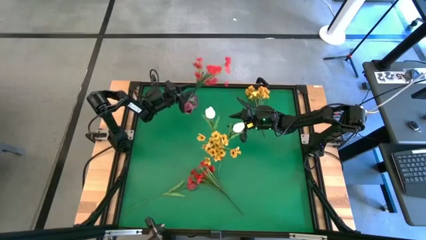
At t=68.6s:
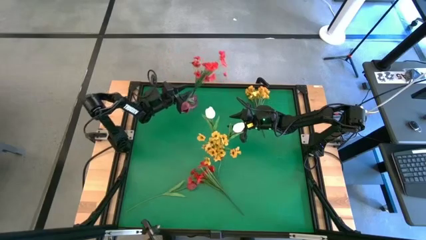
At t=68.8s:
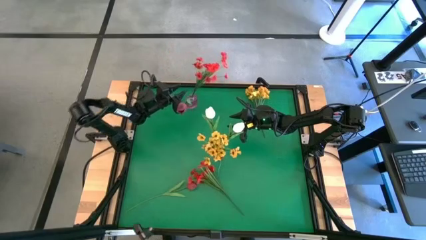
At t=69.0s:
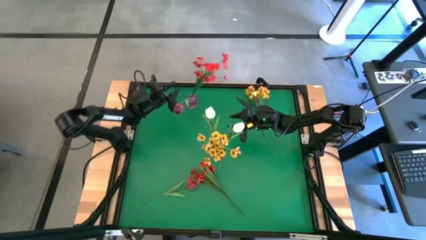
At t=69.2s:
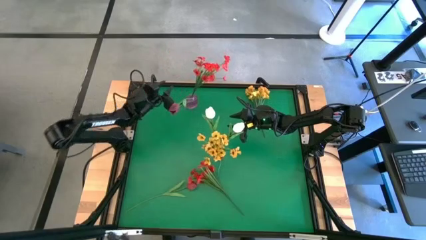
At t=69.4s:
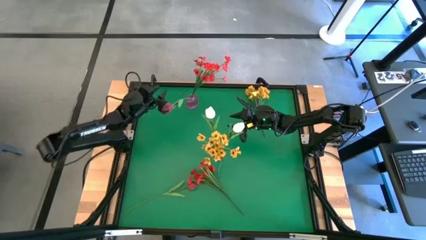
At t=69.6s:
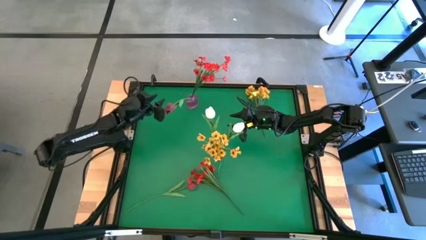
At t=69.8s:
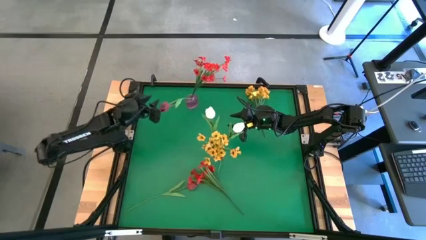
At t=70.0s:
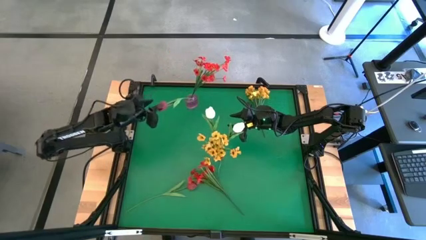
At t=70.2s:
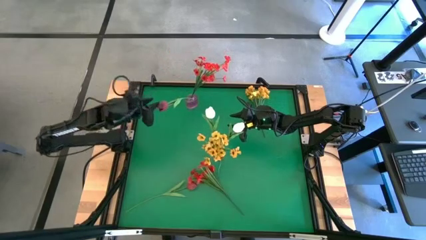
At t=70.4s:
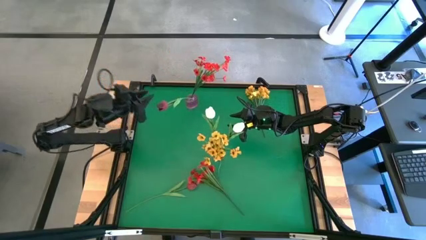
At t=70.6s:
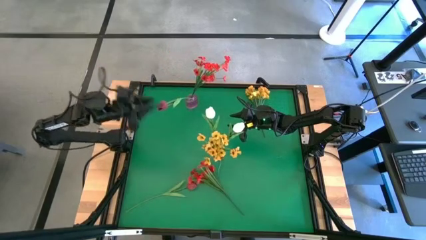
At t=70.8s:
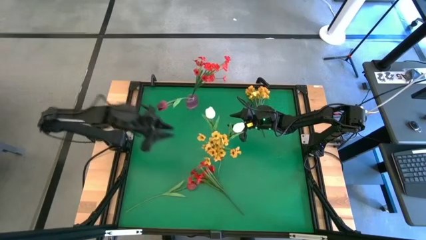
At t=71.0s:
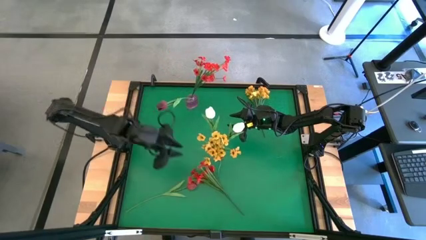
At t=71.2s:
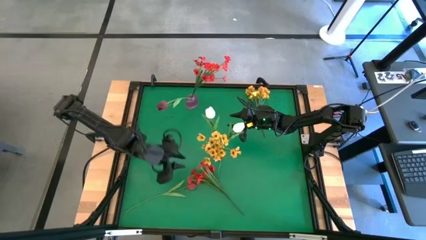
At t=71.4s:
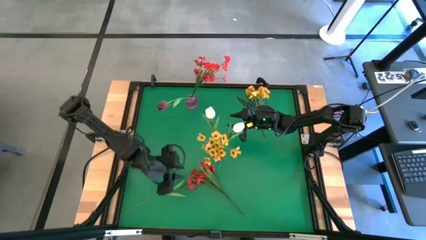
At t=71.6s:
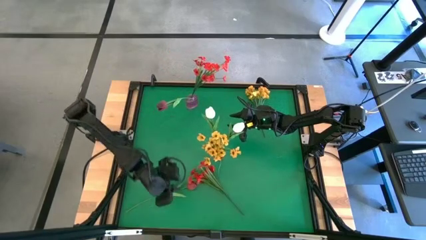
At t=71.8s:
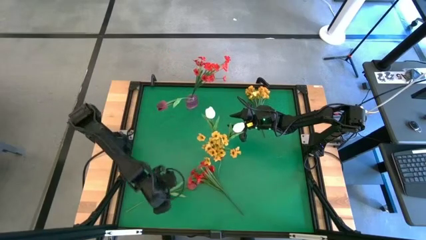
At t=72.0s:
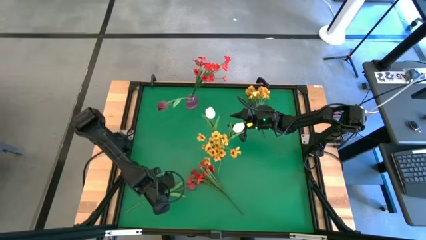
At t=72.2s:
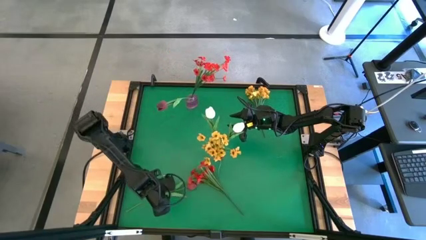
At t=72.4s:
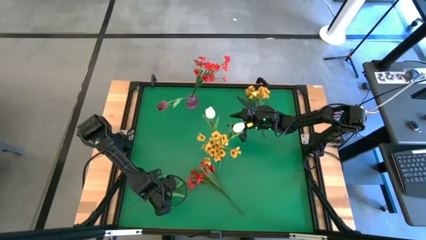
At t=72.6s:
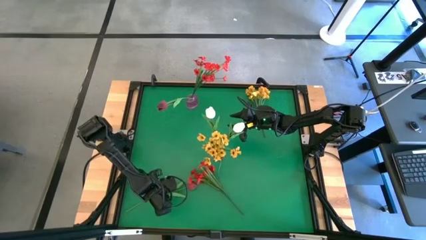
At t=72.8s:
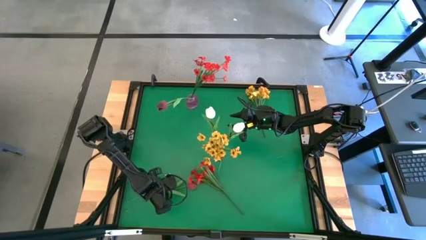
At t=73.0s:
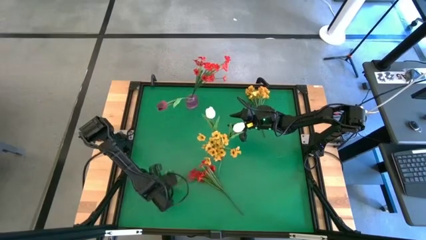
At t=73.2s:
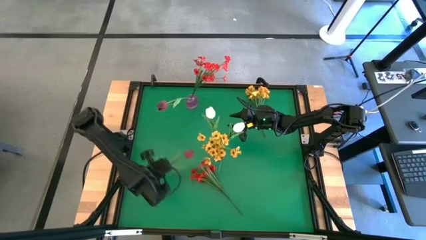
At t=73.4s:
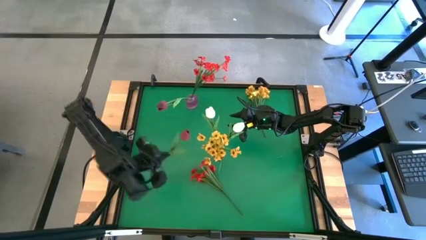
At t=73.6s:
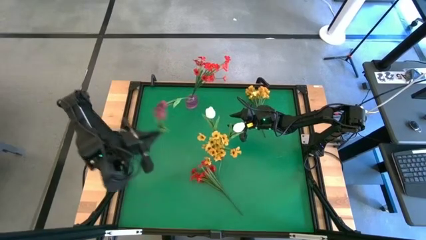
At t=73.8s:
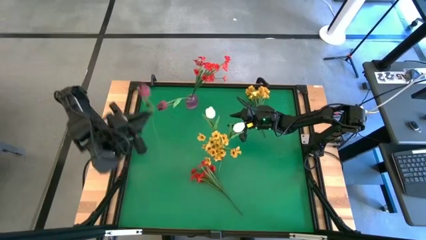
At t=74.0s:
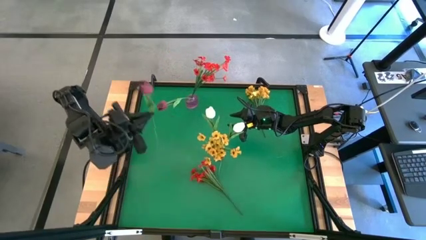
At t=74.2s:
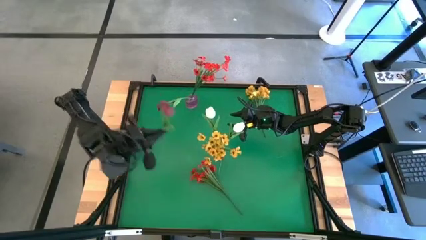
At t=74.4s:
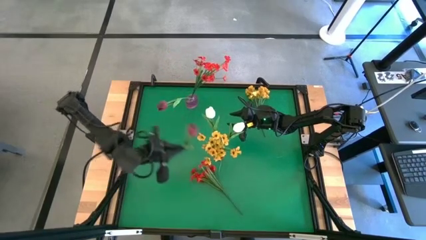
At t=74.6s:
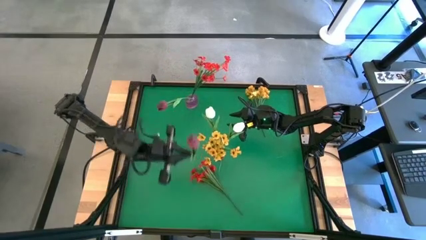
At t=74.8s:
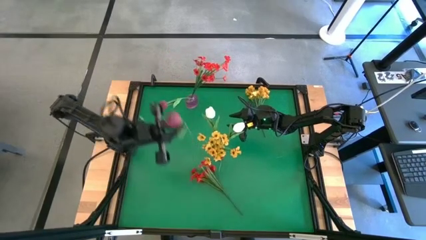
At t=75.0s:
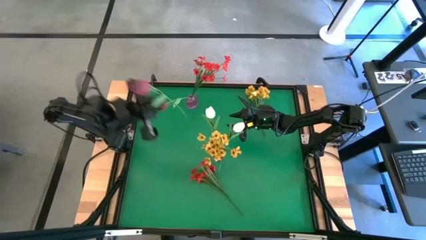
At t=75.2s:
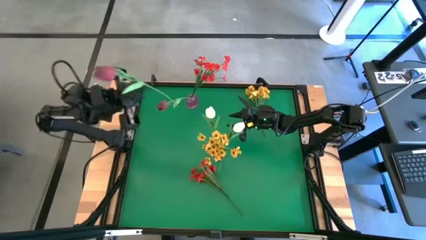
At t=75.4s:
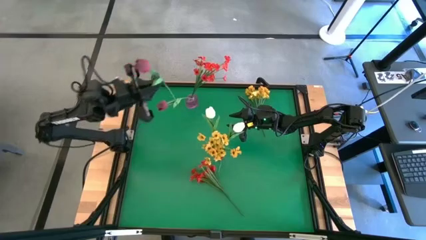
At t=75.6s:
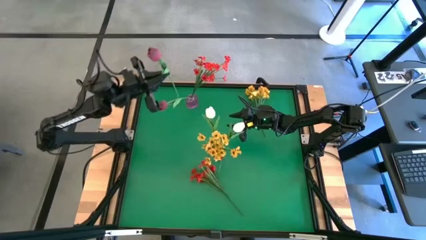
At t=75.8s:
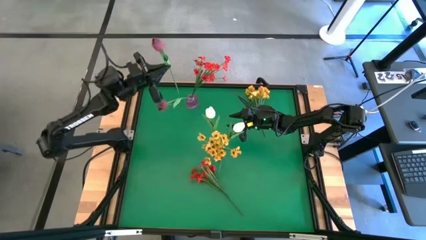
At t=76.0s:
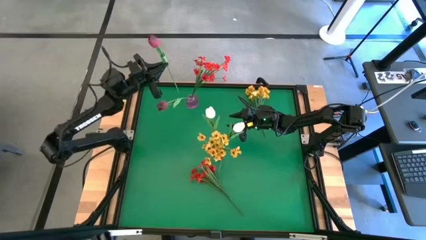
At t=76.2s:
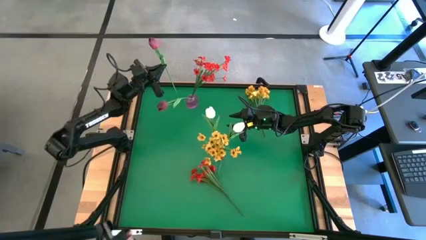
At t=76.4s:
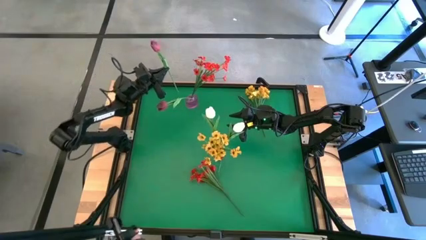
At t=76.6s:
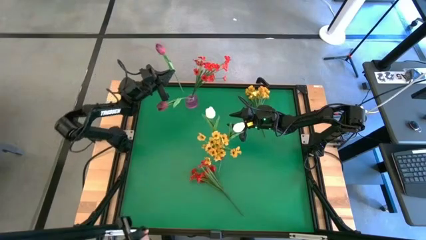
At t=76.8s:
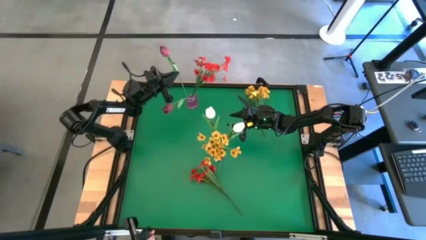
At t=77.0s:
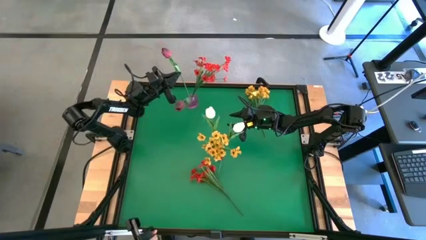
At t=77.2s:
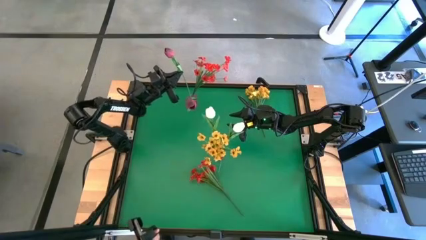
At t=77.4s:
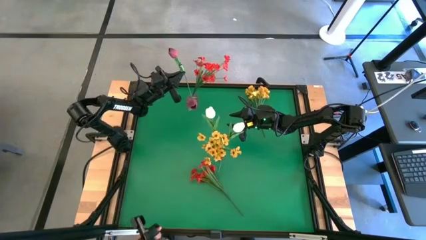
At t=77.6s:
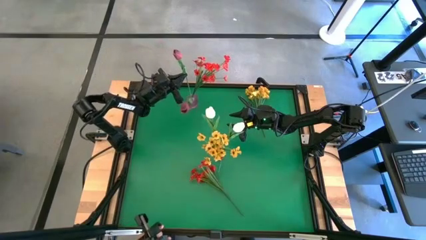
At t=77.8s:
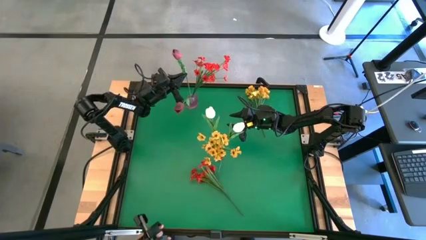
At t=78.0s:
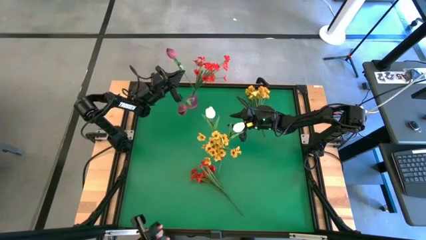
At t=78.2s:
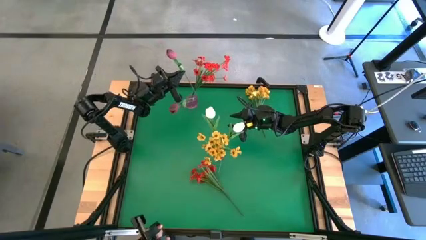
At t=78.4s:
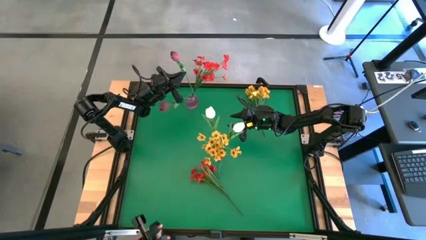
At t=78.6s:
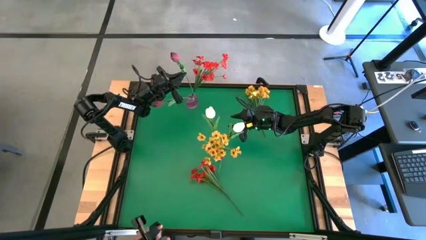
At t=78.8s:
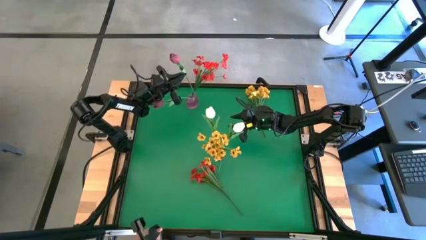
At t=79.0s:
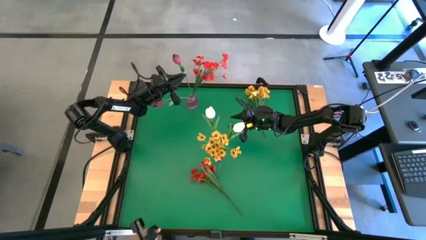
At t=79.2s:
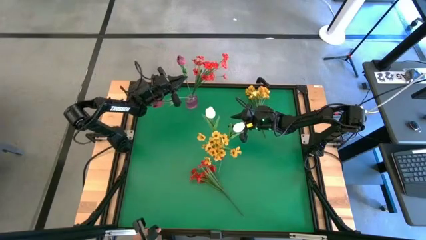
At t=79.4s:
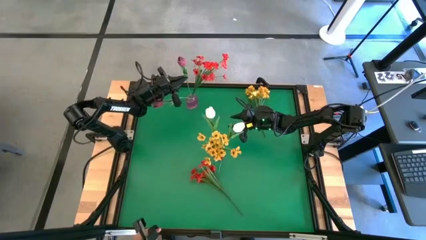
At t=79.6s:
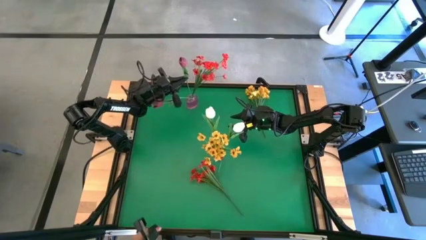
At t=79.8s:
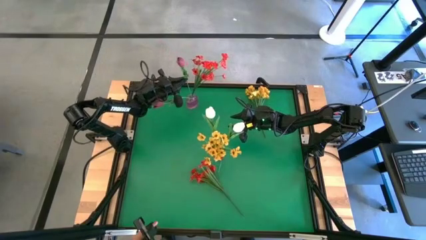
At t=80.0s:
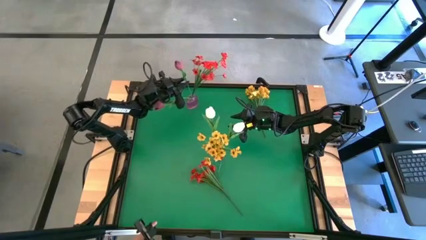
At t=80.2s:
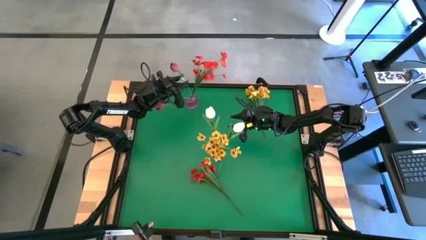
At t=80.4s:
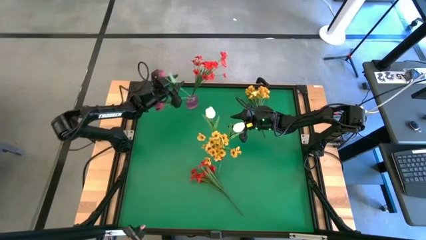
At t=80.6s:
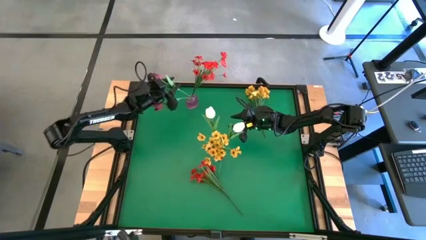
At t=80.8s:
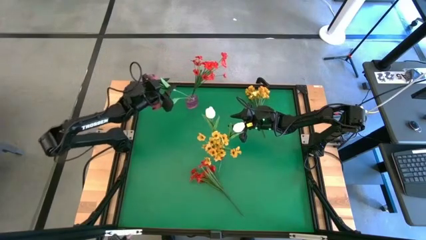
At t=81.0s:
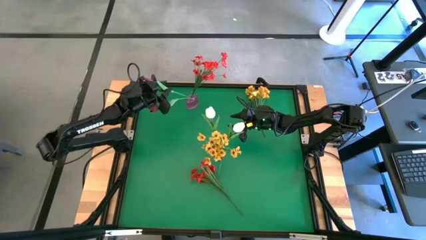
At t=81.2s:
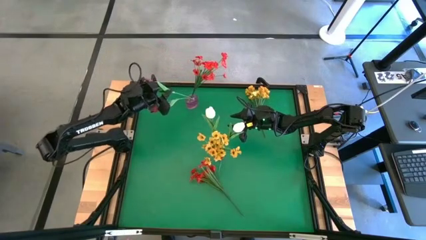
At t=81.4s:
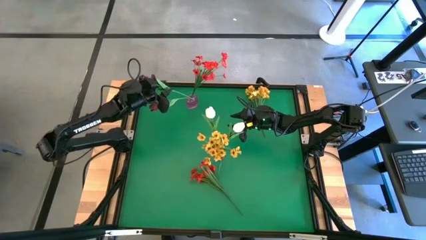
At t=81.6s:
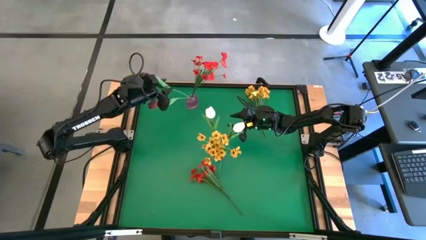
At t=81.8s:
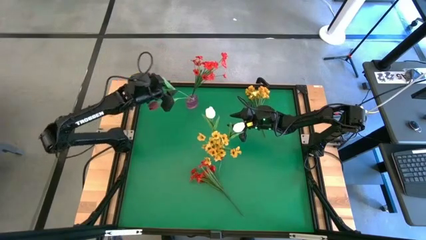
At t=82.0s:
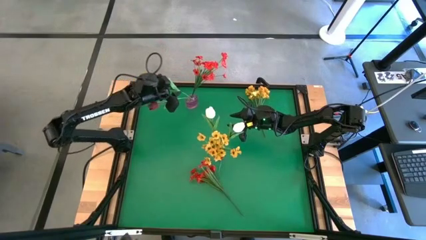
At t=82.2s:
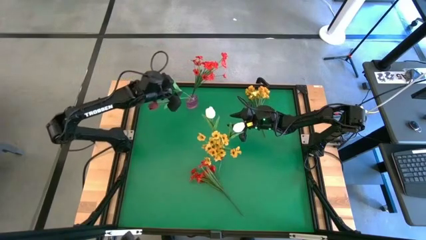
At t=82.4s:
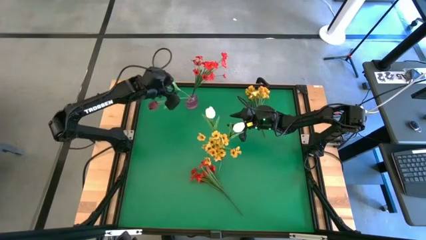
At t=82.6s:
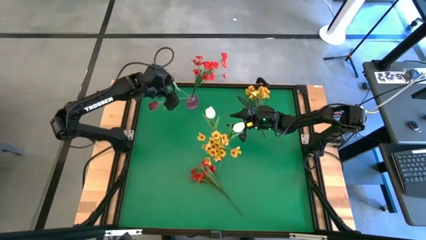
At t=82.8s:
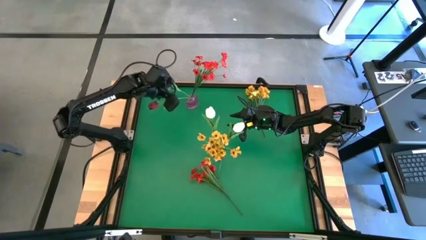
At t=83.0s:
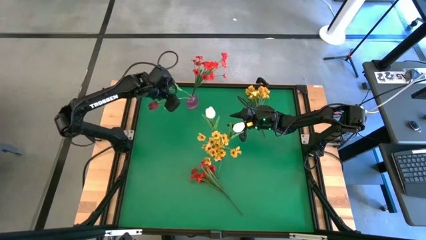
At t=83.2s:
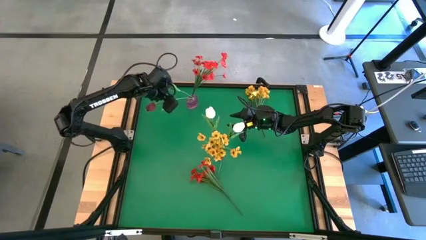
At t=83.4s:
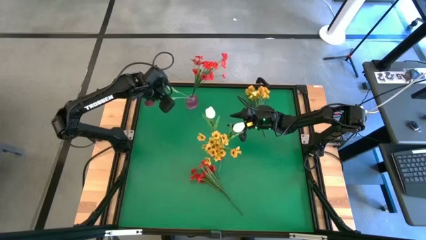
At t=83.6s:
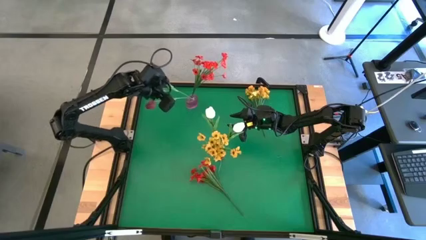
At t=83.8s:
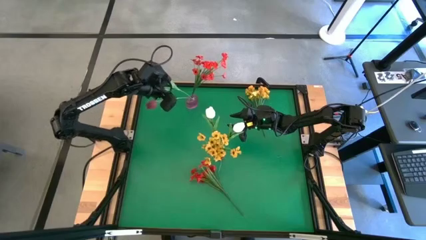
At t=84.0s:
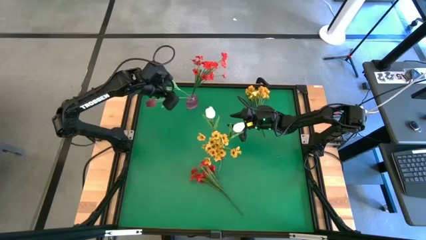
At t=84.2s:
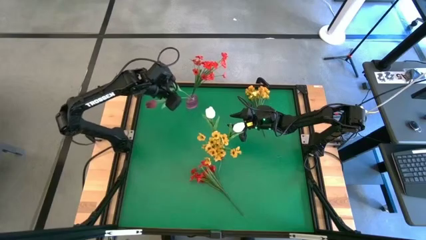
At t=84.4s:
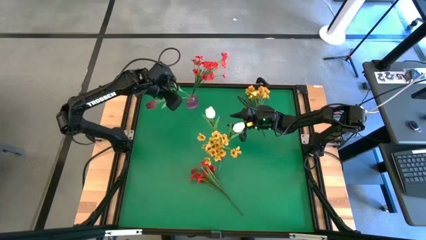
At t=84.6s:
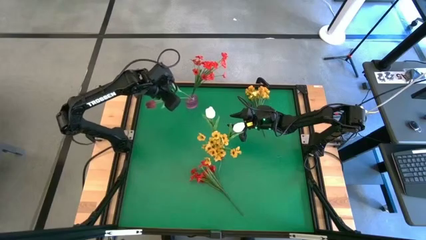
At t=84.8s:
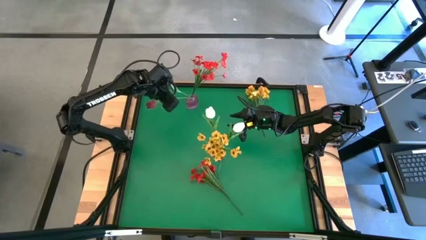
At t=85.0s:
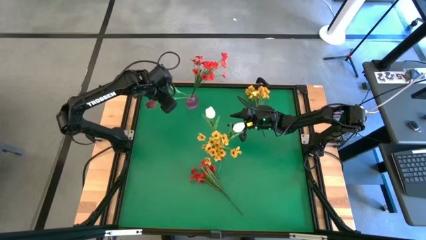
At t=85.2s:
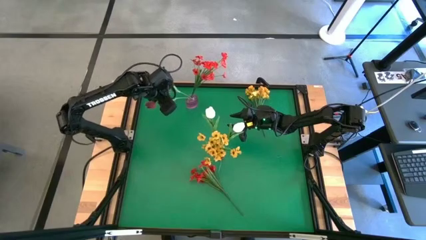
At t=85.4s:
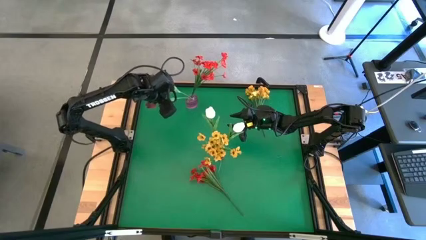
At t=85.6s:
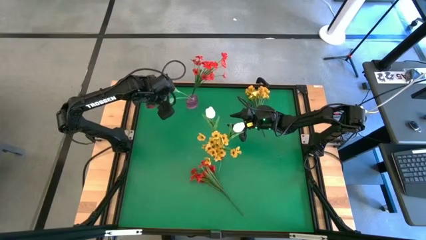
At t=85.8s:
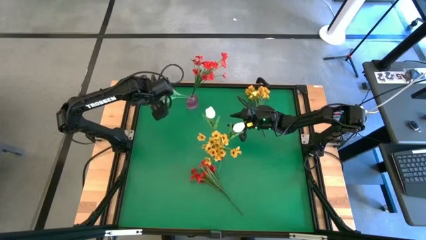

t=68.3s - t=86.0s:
Task: Sort flowers into vase by color
Put the red tulip into the pink vase
